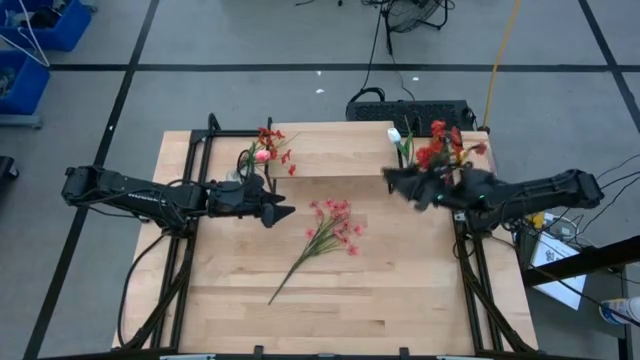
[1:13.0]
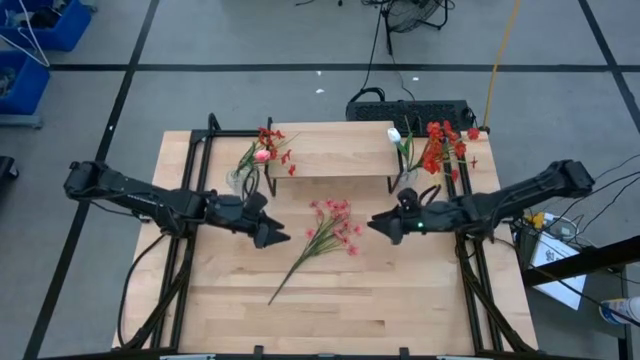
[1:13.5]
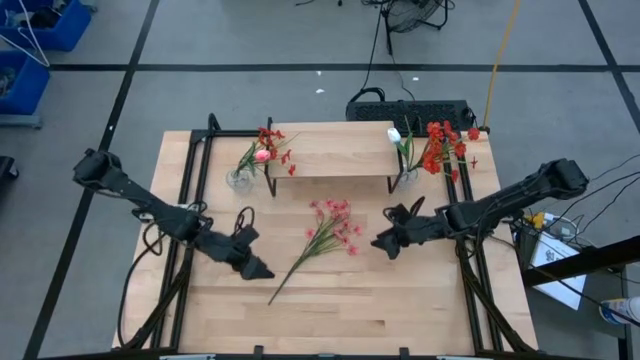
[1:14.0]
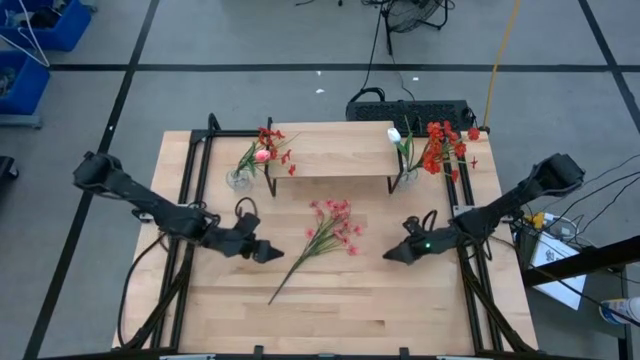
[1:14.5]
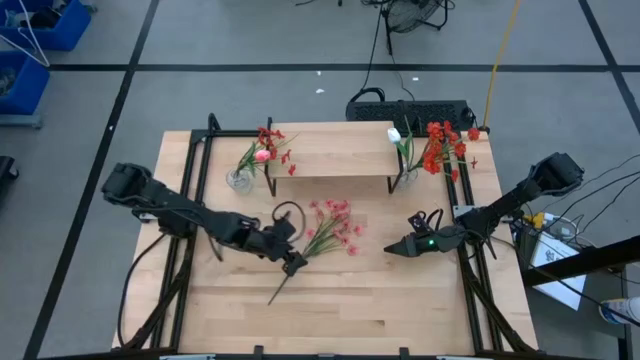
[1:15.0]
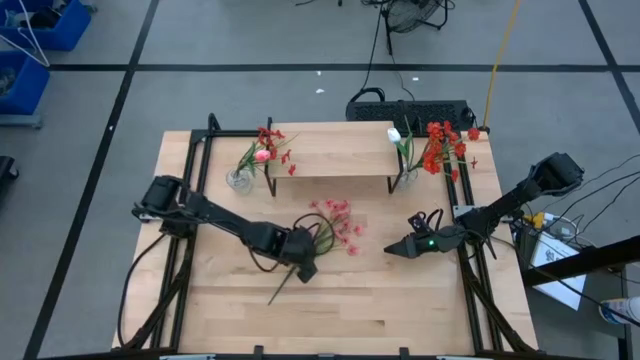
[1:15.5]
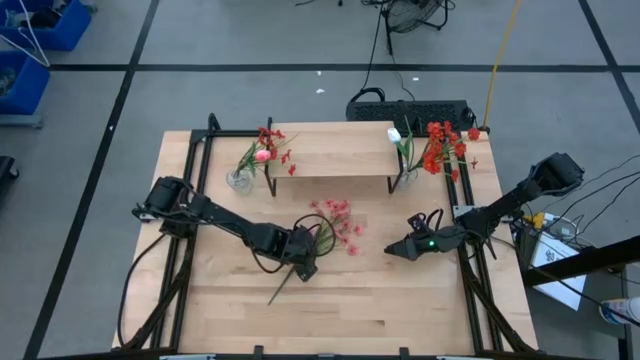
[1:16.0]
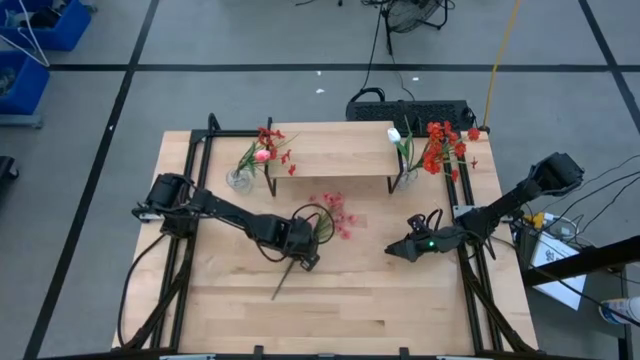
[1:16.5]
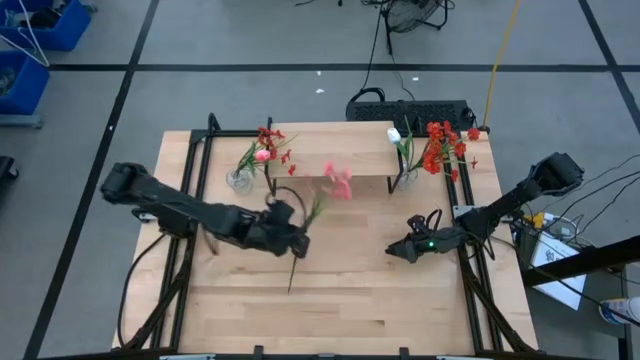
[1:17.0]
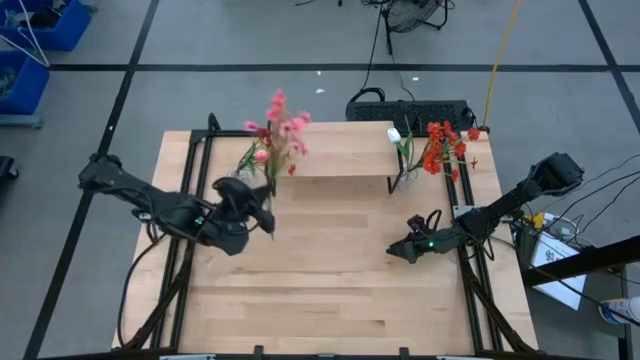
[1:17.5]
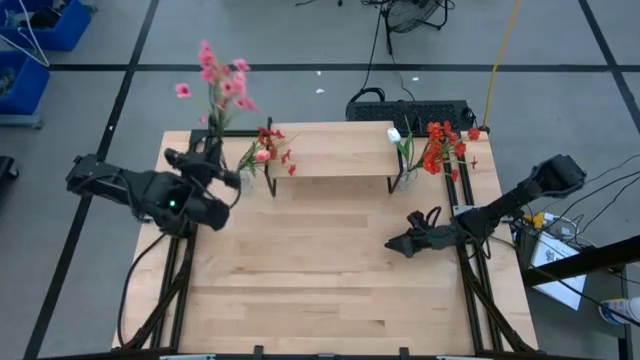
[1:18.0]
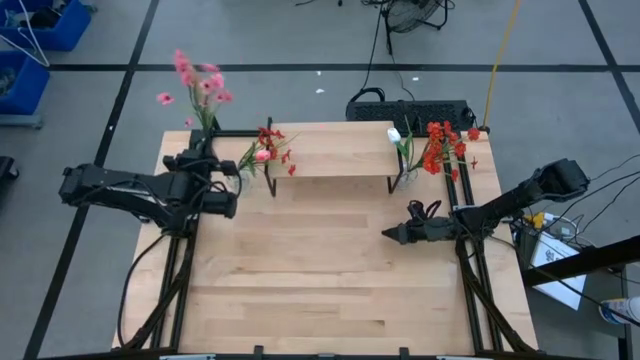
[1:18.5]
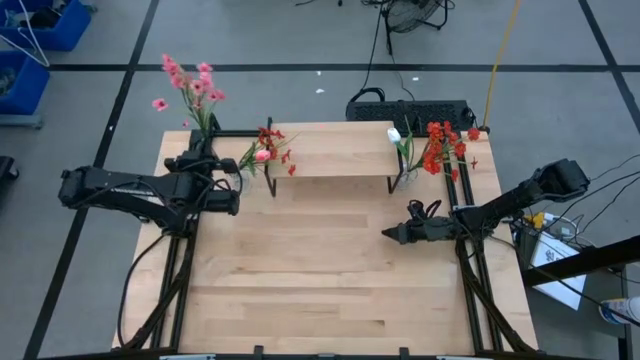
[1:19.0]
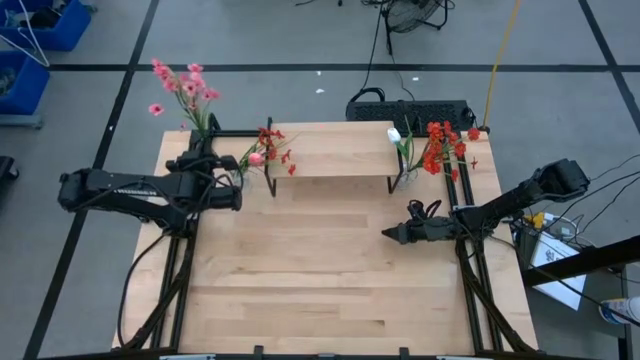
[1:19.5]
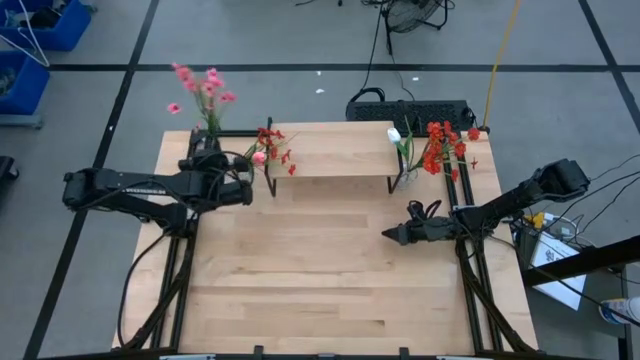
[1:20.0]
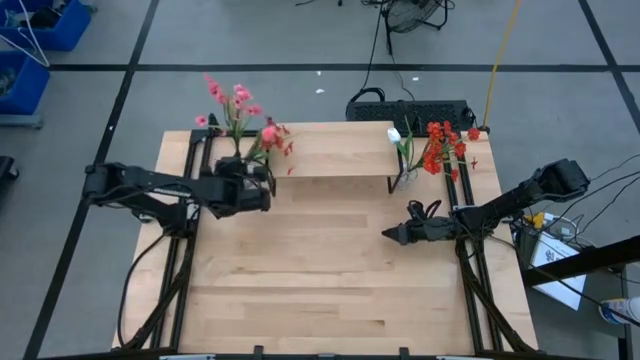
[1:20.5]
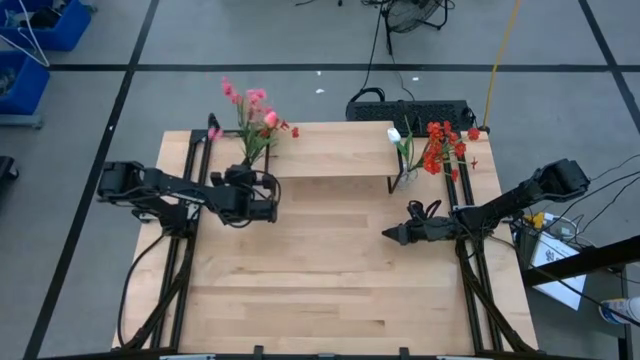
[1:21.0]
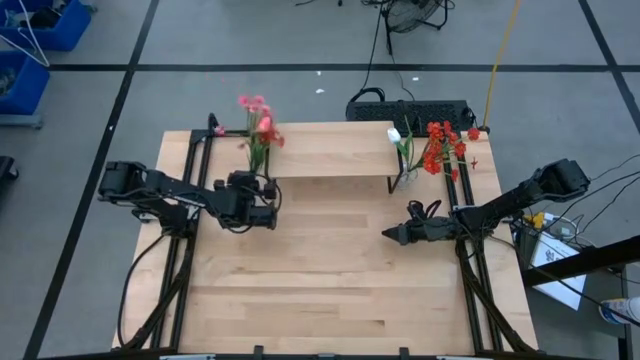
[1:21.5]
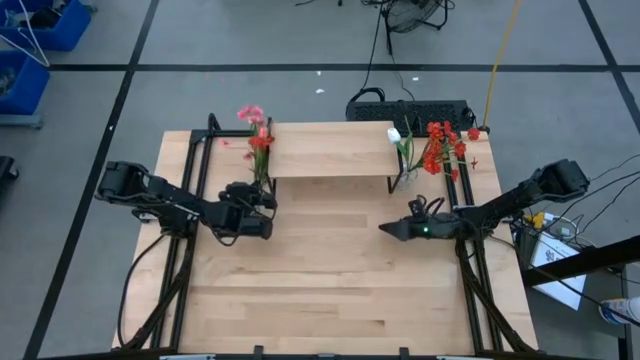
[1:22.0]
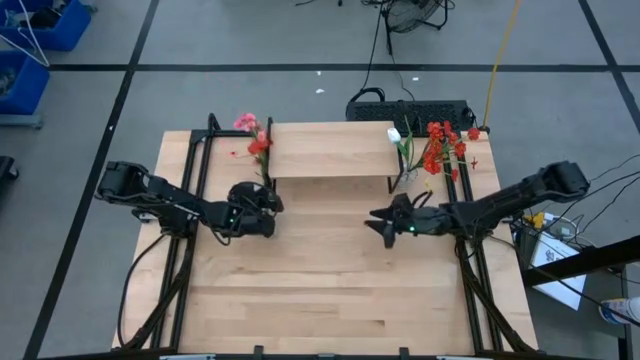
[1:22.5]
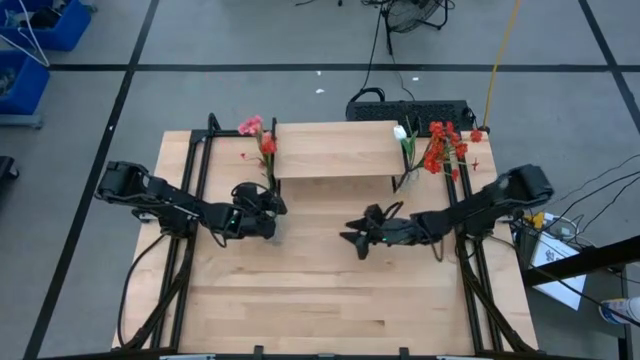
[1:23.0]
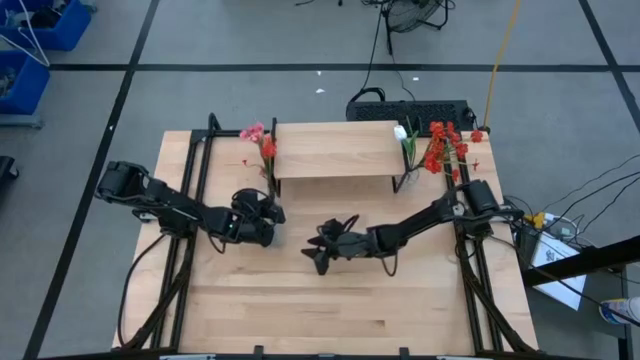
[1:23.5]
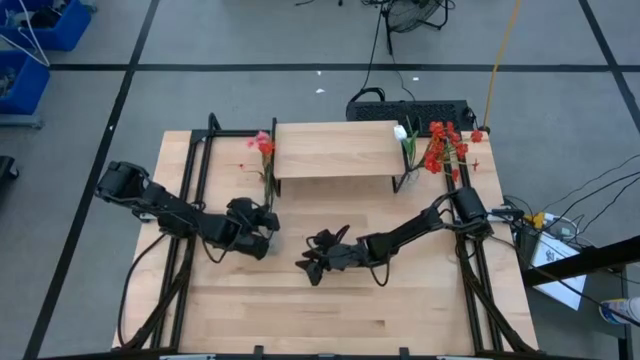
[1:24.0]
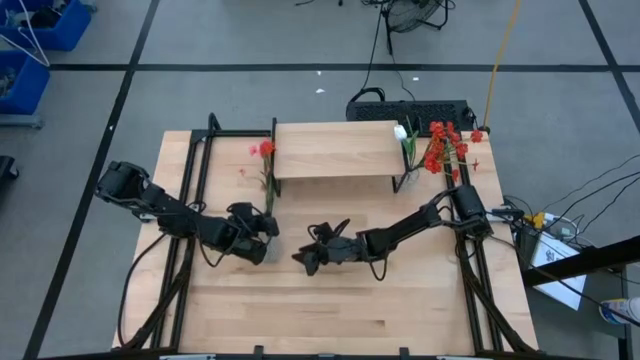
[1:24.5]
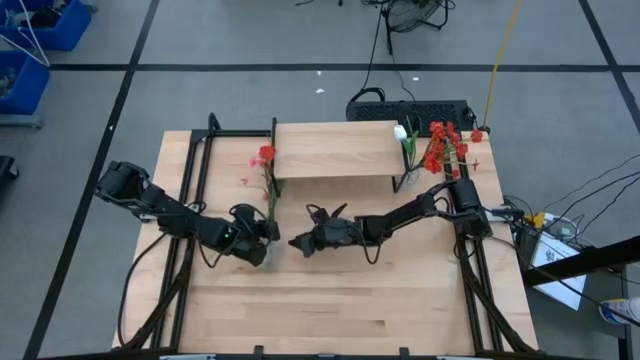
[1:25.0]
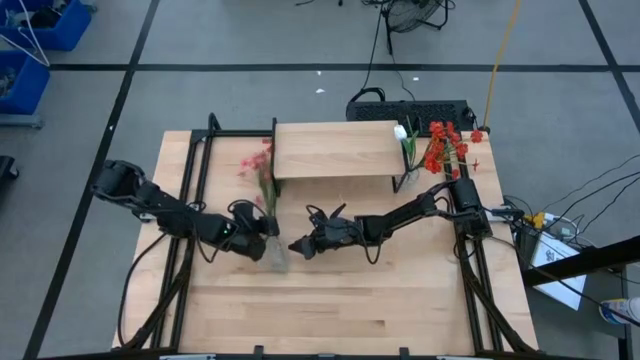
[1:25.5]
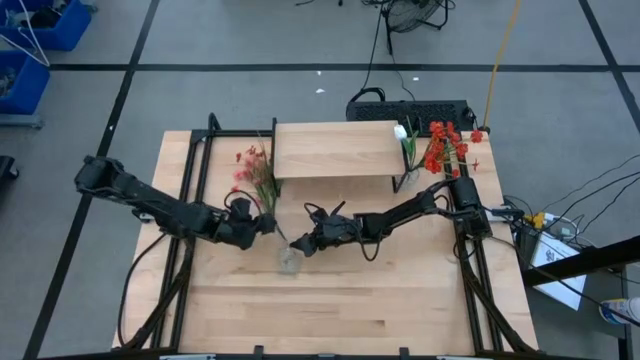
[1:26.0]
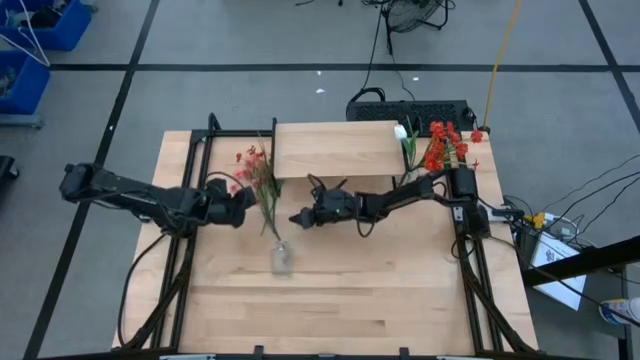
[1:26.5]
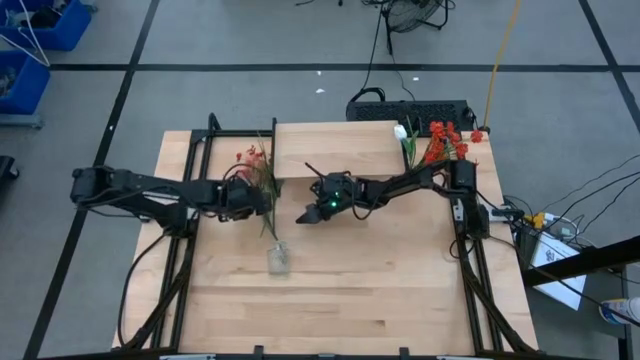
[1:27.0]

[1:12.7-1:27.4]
Task: Pick and place flowers into a vace then onto a shelf
Put the pink flowers into the left transparent vase

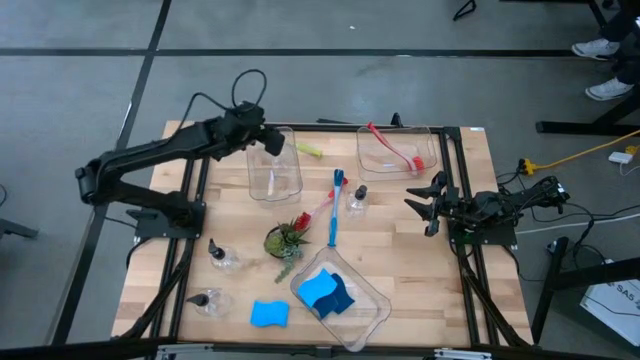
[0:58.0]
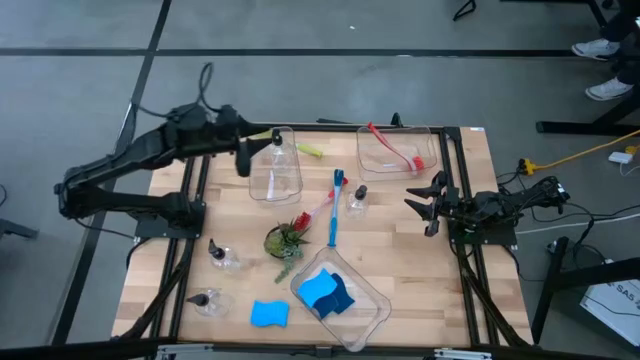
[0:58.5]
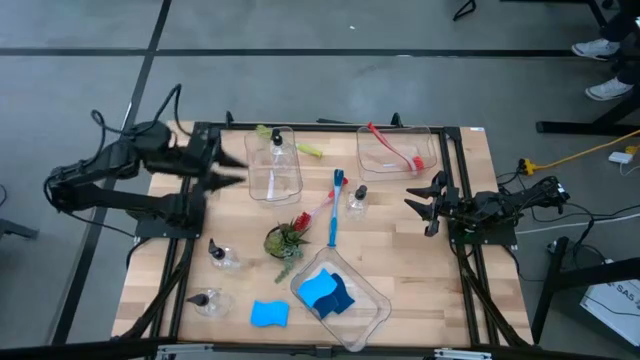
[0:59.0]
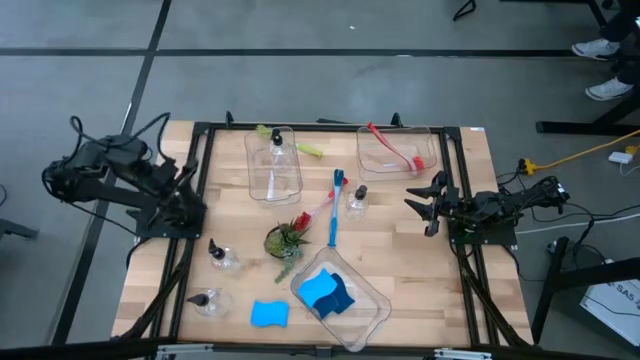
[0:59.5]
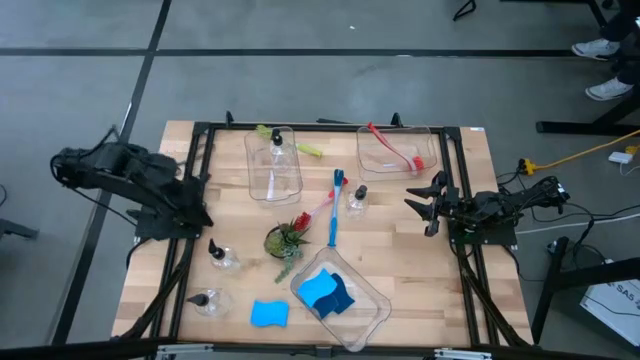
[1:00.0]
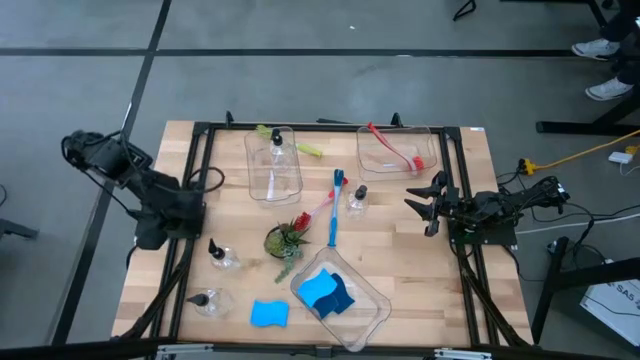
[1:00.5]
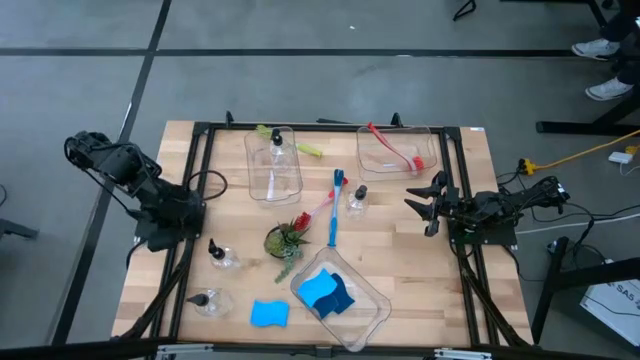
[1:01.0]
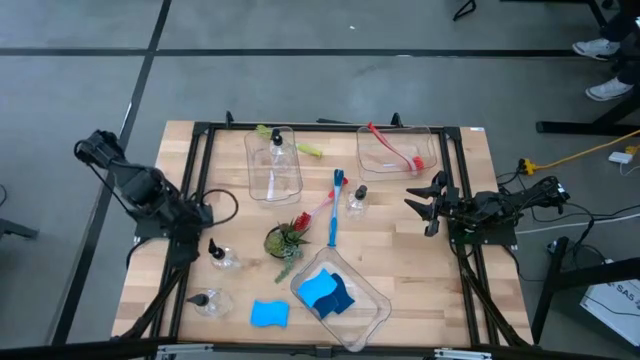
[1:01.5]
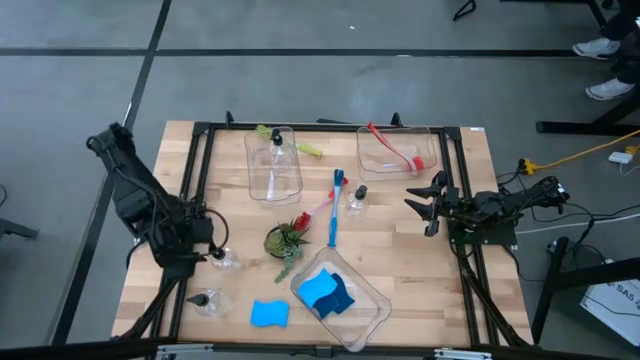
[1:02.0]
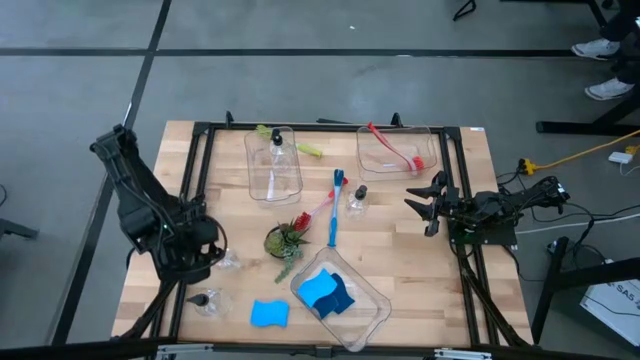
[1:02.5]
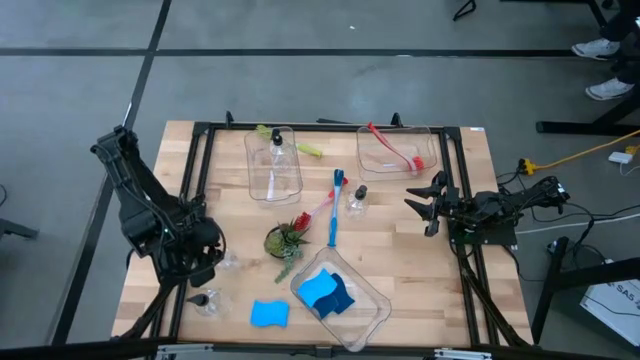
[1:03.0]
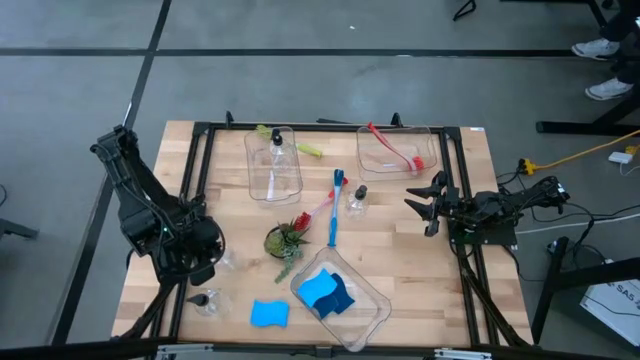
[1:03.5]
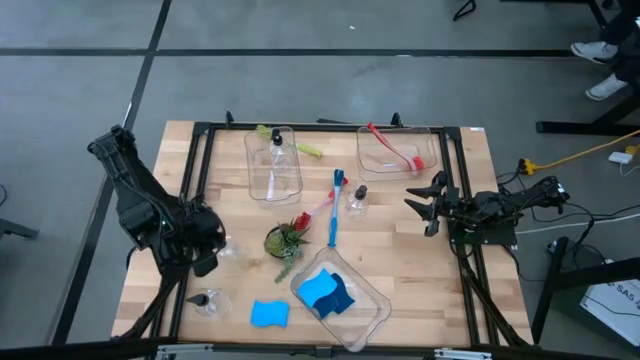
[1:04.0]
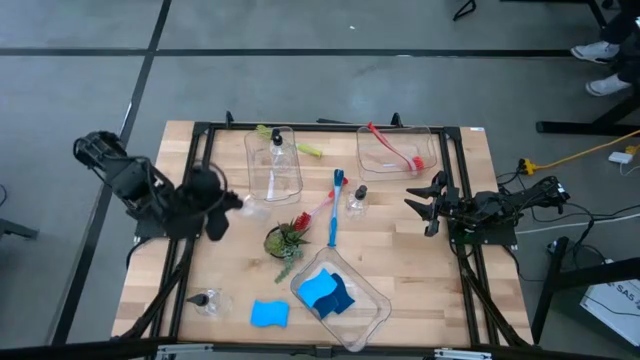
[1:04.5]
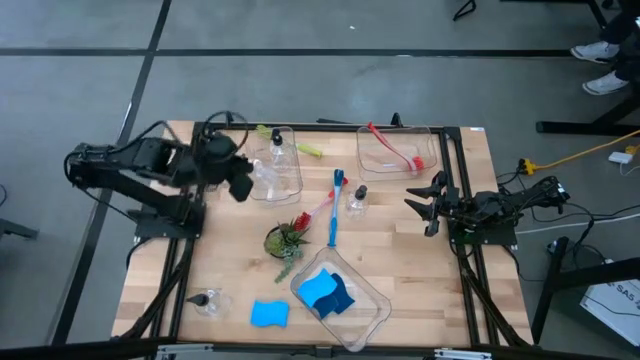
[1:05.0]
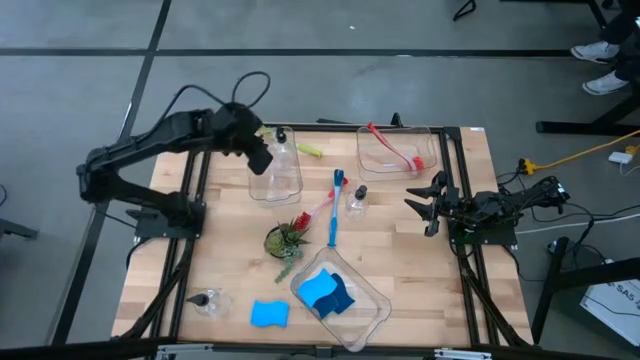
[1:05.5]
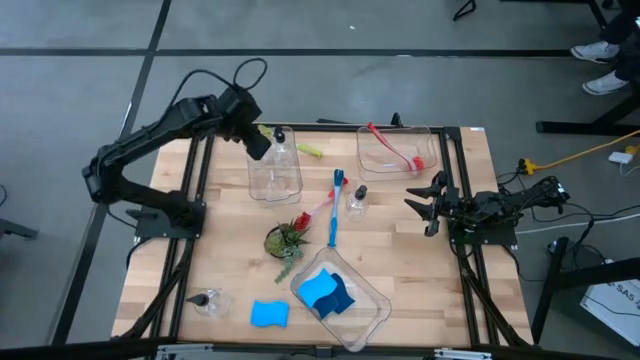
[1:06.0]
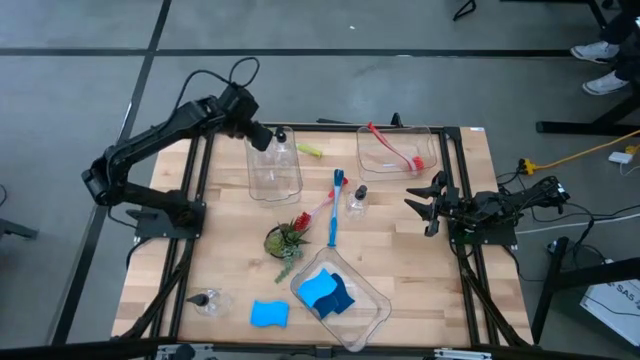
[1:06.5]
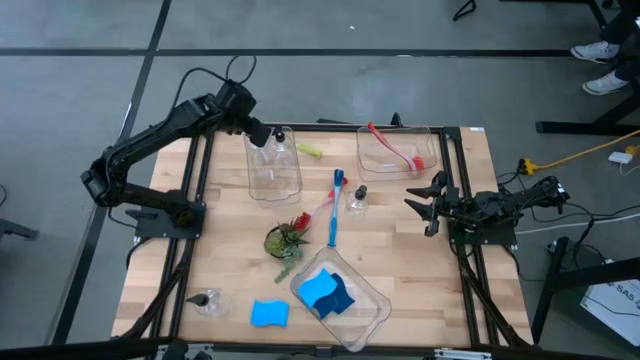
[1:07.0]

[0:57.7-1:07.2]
Task: Pick & Place Kitchen Sink Supplies
Put the transparent soap dispenser into the top left transparent bin
